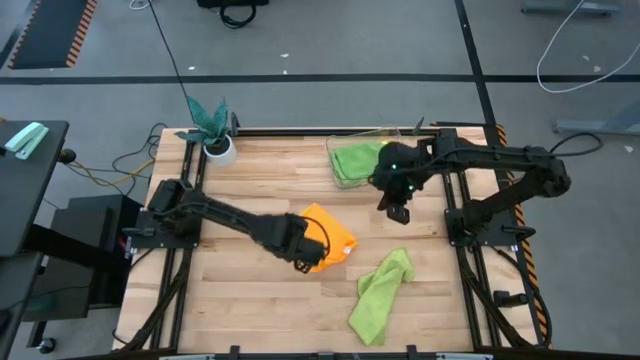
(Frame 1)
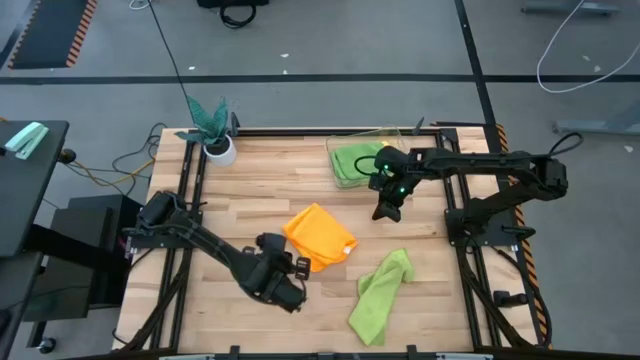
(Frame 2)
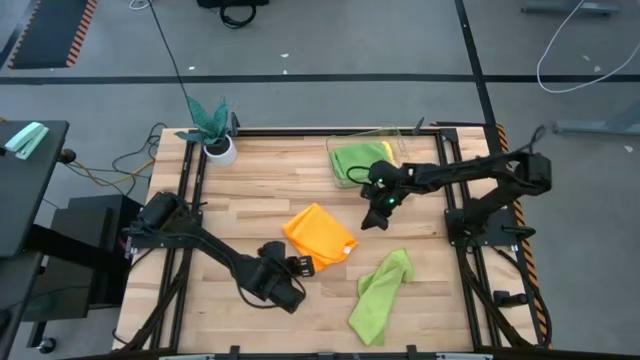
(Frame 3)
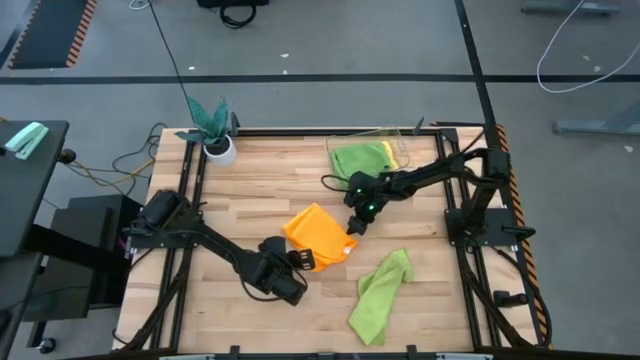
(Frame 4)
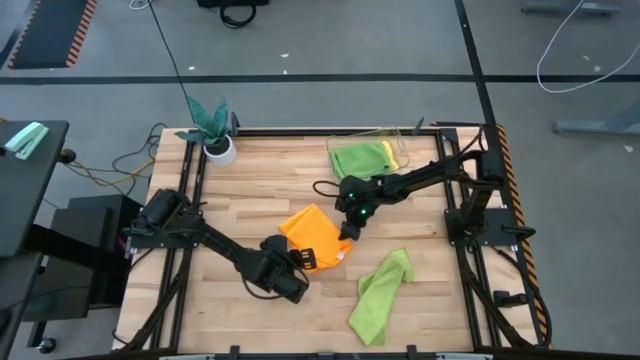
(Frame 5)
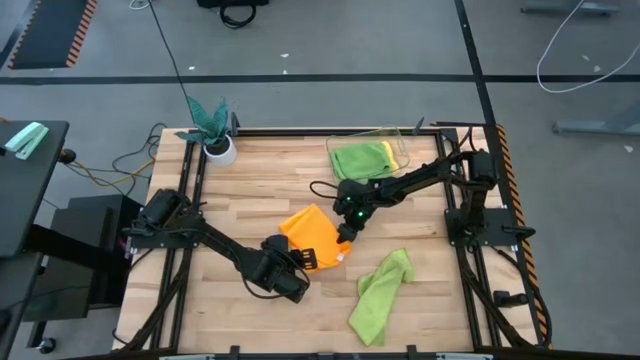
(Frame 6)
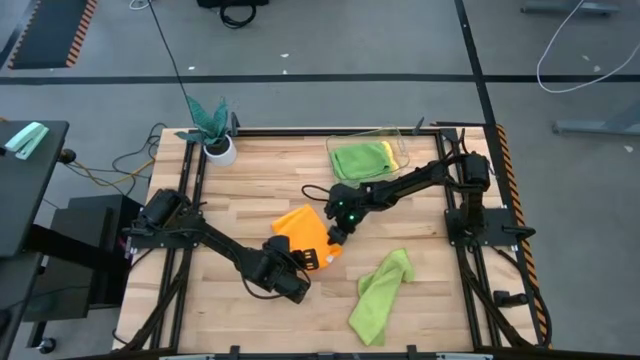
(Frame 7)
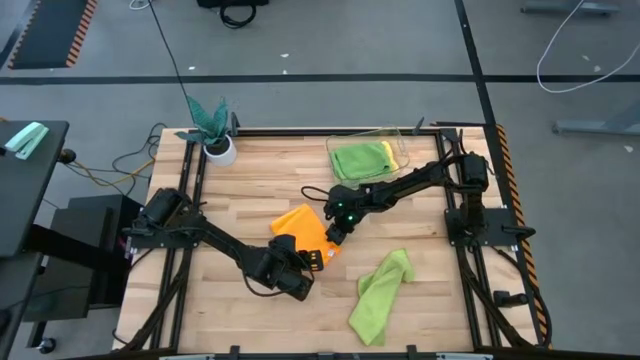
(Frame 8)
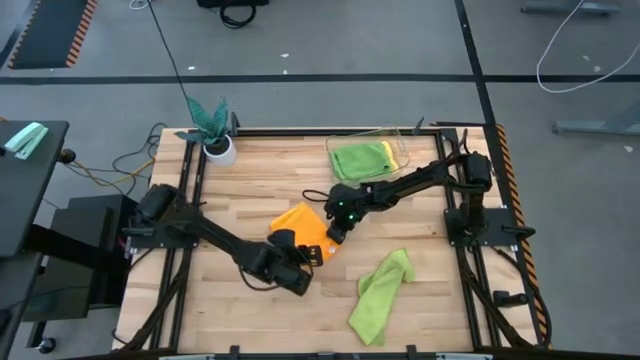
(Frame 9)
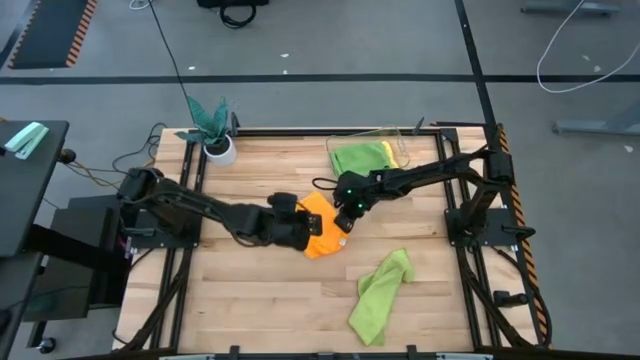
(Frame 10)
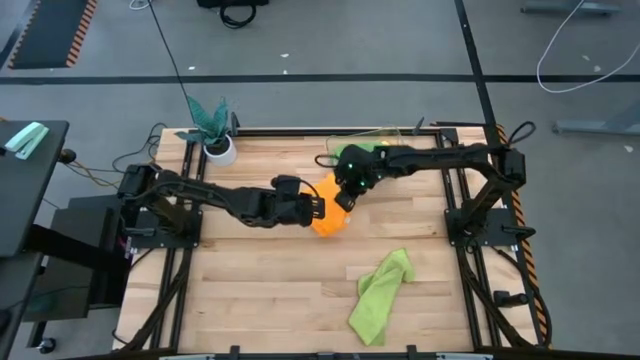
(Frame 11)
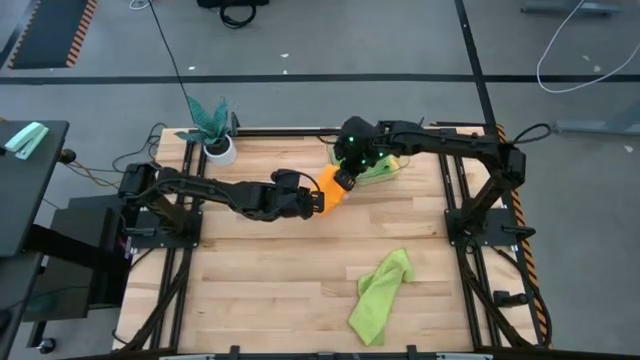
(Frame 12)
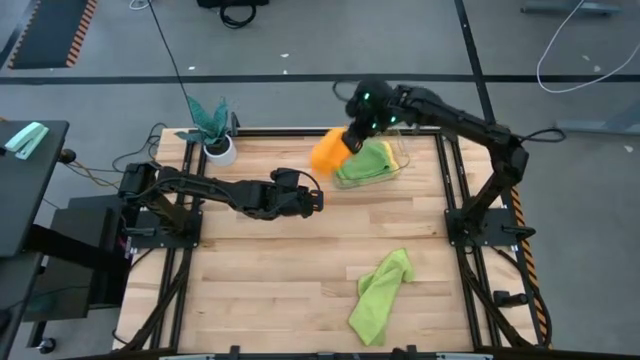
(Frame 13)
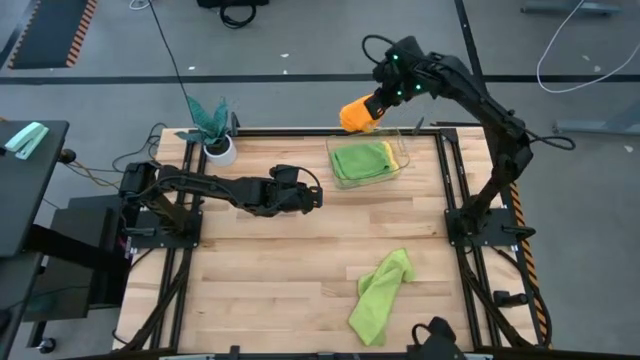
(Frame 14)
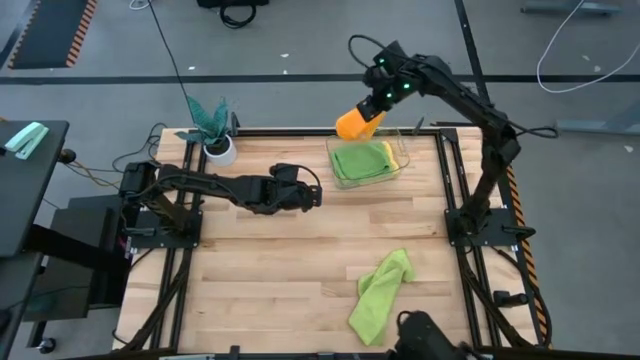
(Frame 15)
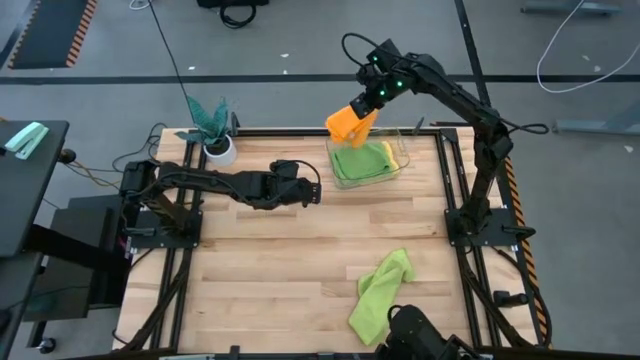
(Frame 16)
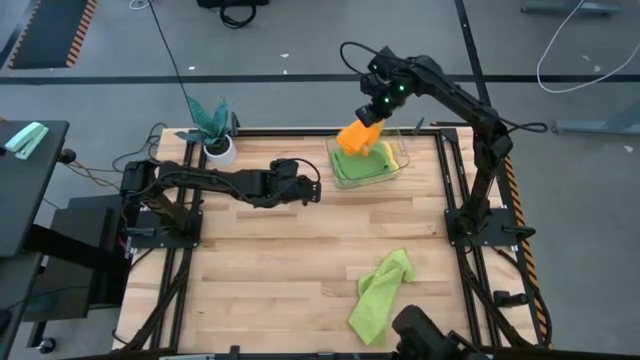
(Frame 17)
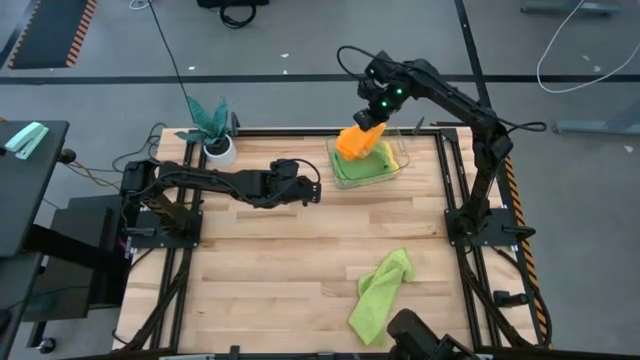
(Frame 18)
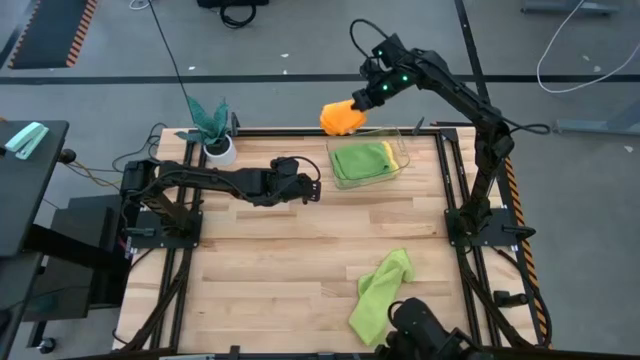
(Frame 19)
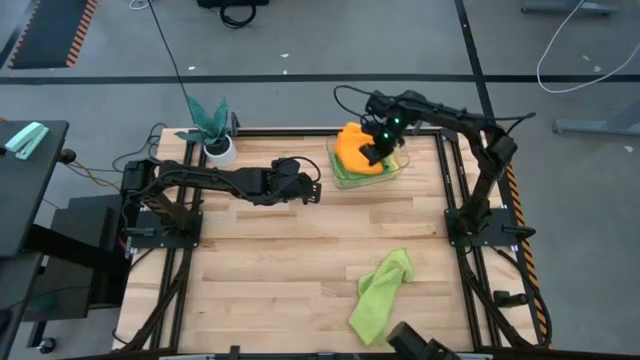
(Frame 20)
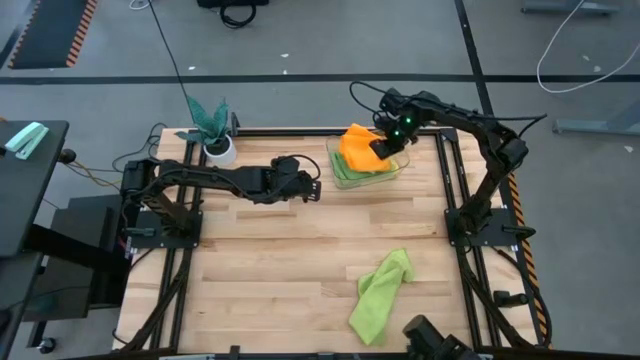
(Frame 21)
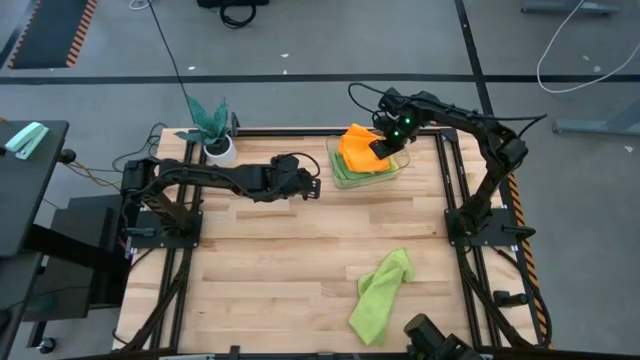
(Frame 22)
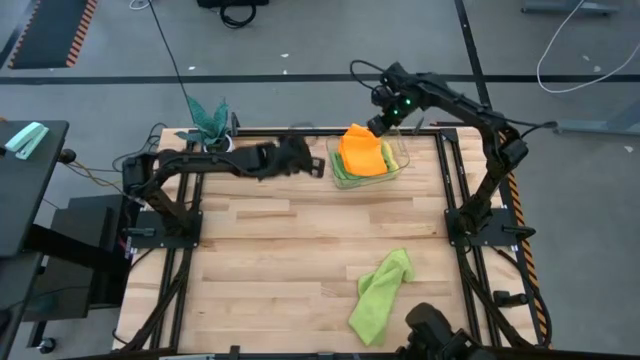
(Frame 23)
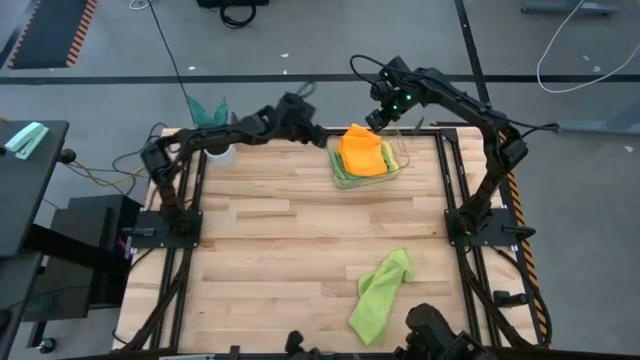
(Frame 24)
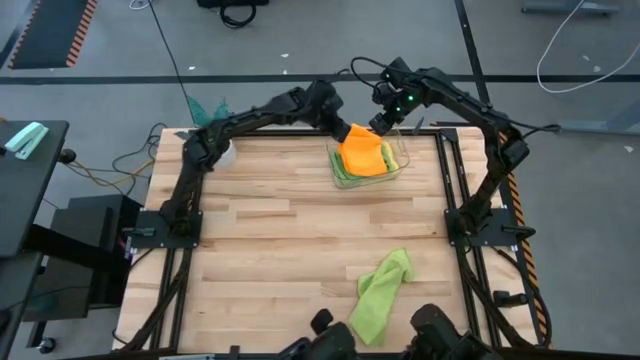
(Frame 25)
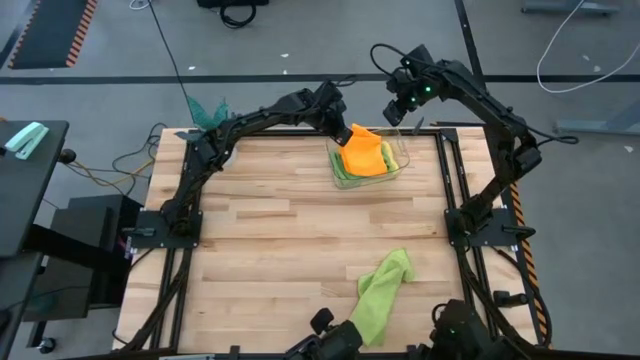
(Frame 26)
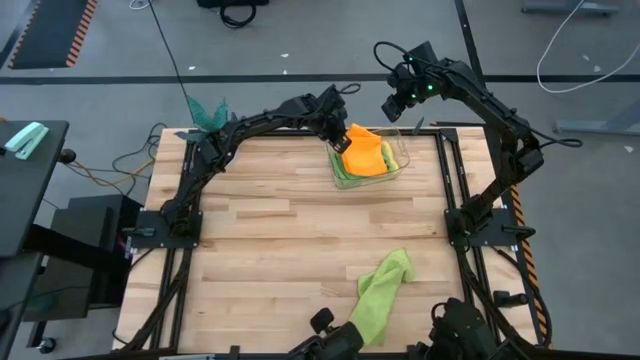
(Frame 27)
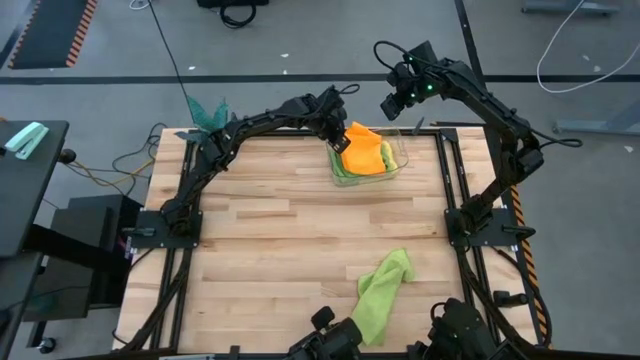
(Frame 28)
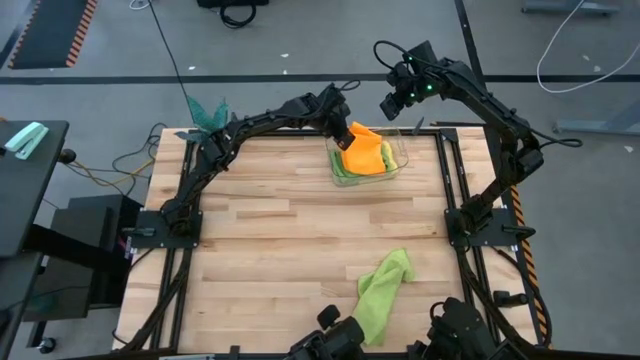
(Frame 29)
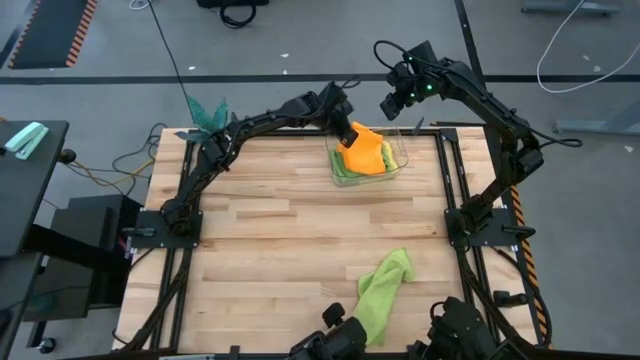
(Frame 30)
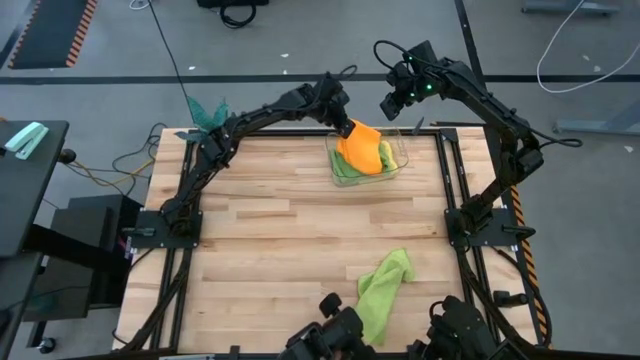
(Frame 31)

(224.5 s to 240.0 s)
Task: Fold microfiber towels
Stack the orange towel on top of the green towel in the transparent bin

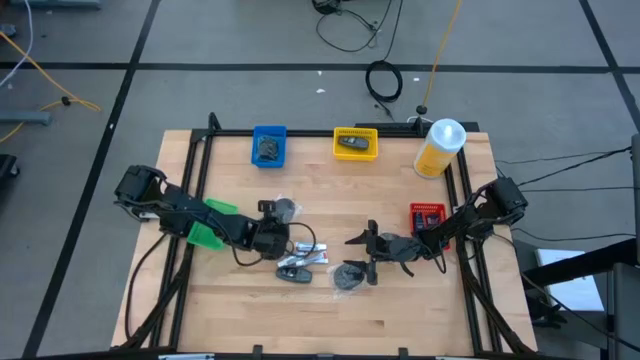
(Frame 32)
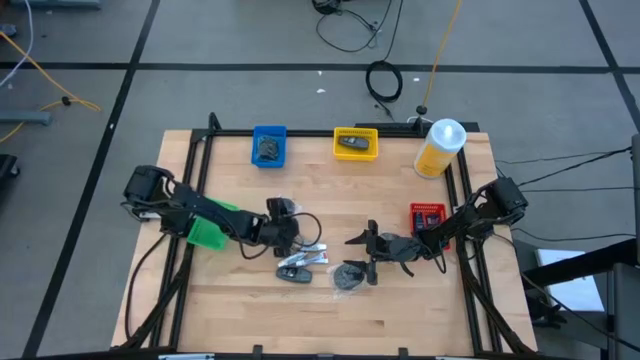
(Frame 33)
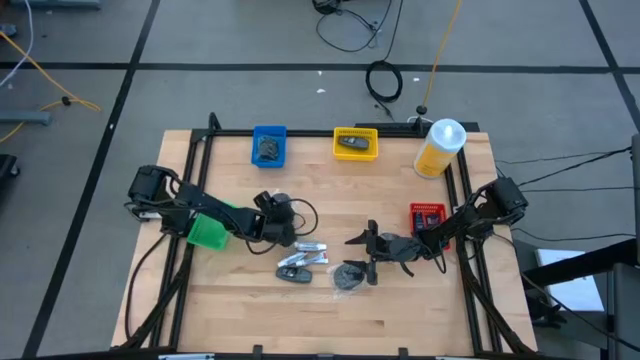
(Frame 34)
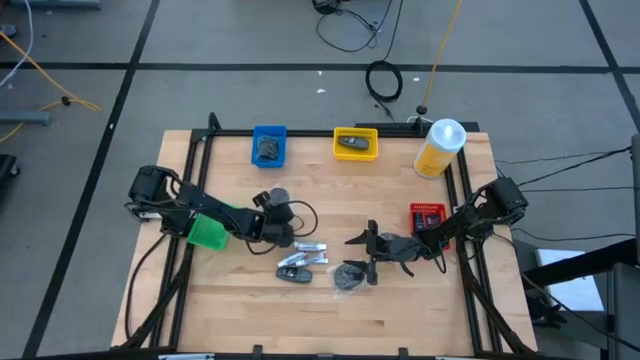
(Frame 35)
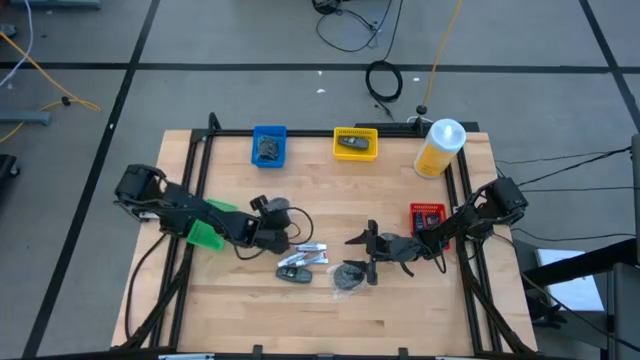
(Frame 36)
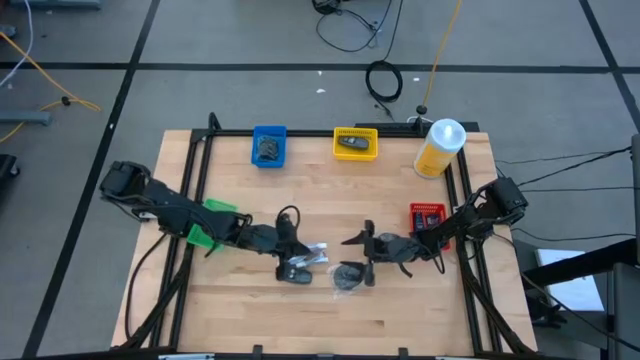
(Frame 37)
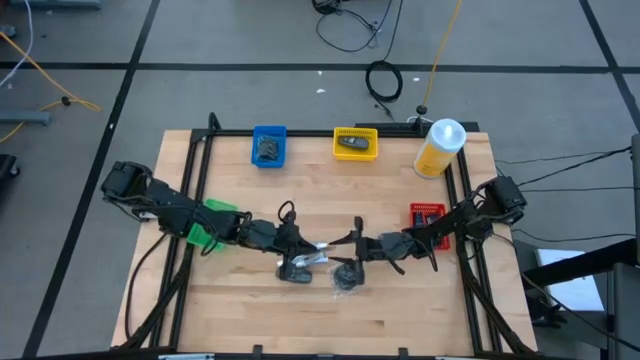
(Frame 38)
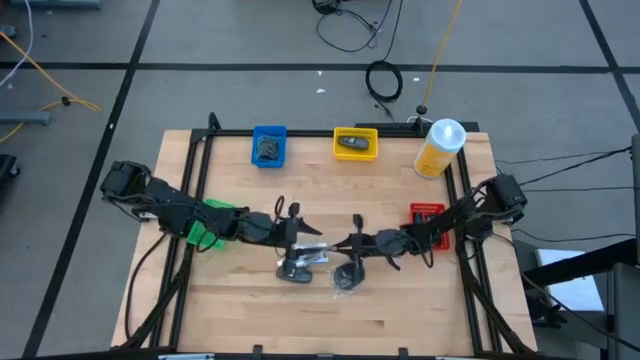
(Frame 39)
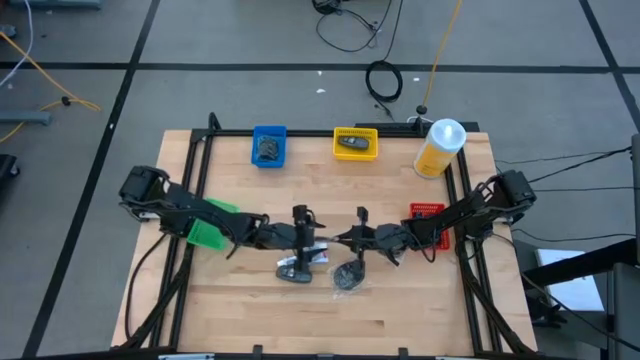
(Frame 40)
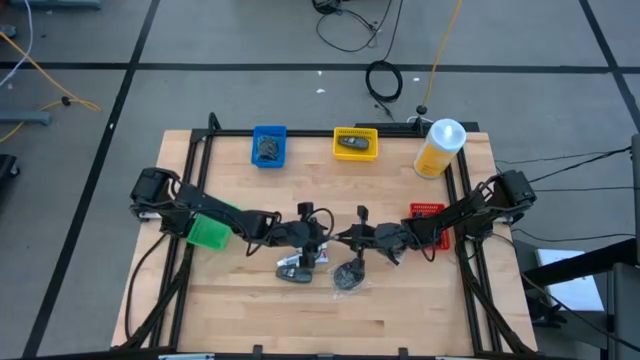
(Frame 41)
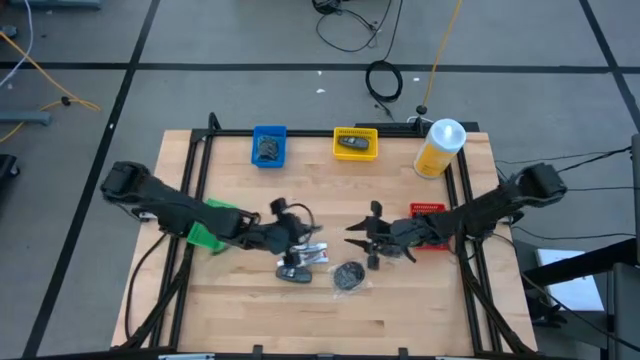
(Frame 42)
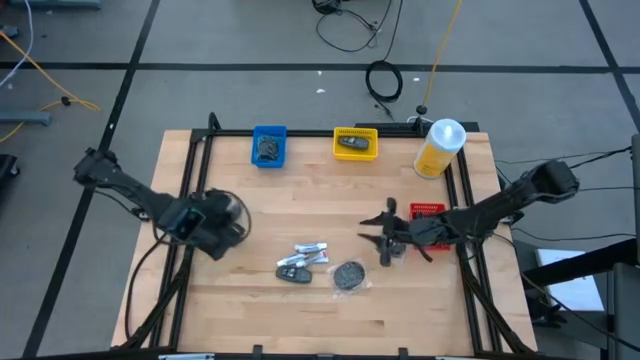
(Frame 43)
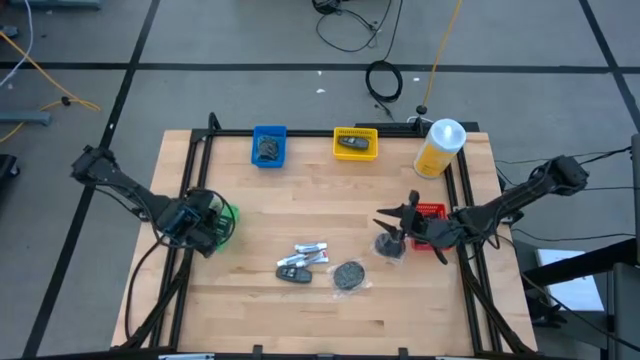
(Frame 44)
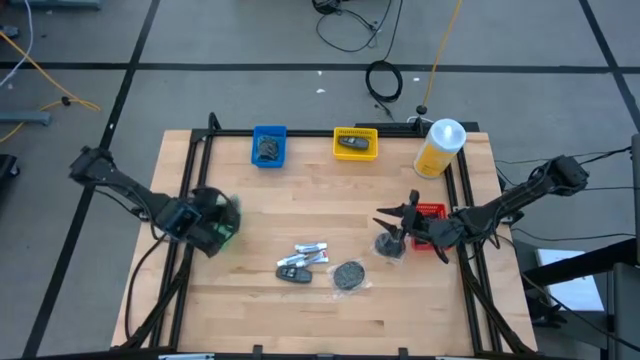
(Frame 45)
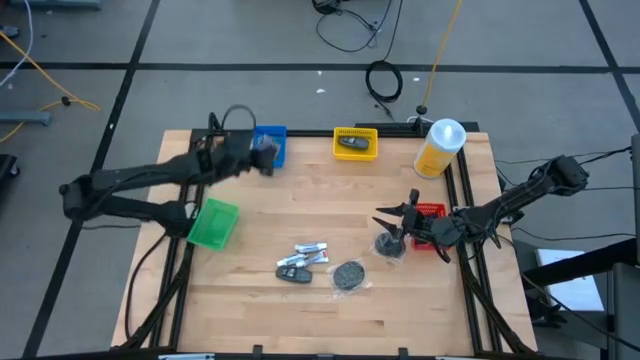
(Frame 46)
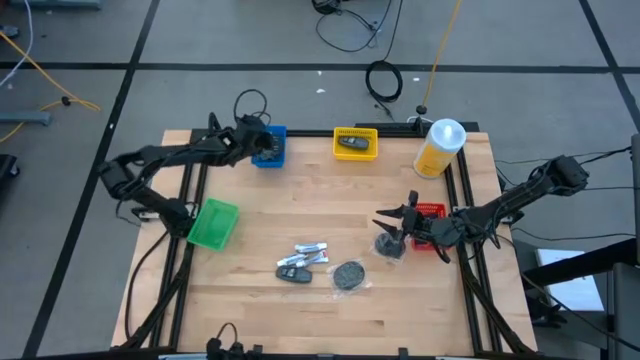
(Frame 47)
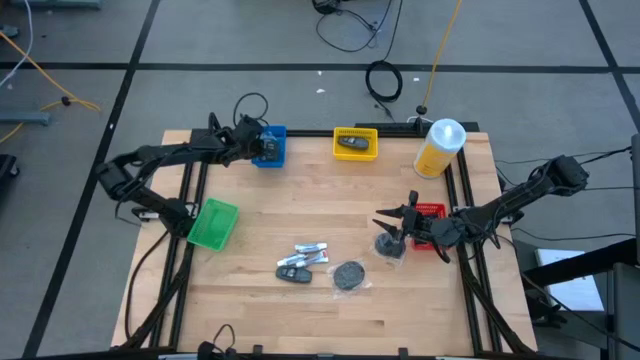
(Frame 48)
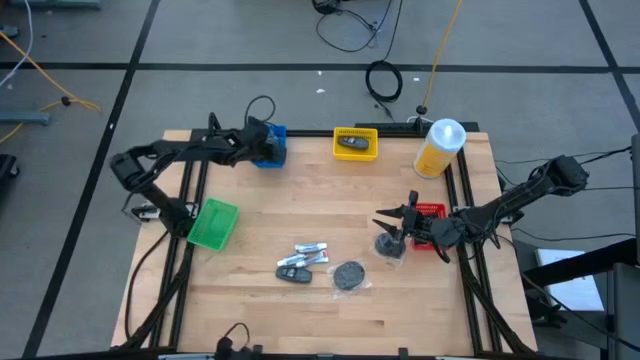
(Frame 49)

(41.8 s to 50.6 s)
Task: Pick & Place Travel size toiletries
Put the black hairbrush into the blue bin
